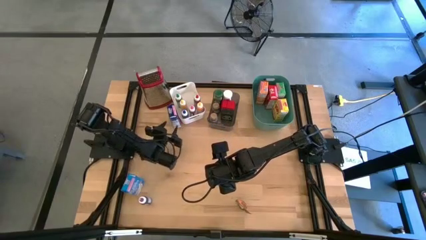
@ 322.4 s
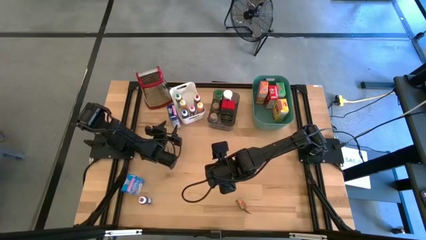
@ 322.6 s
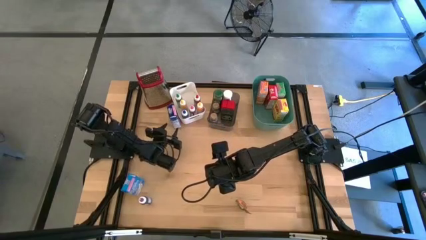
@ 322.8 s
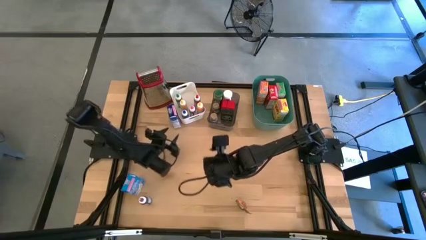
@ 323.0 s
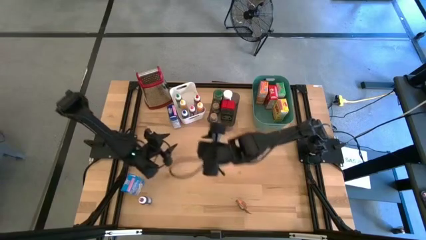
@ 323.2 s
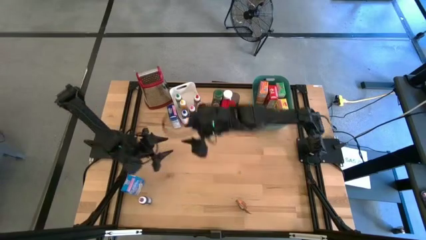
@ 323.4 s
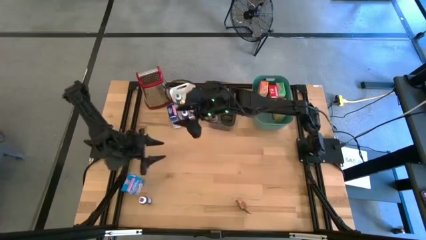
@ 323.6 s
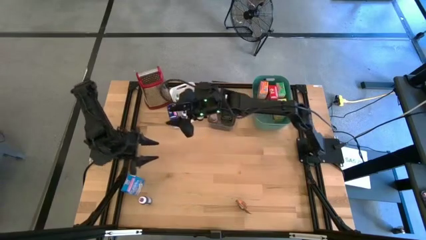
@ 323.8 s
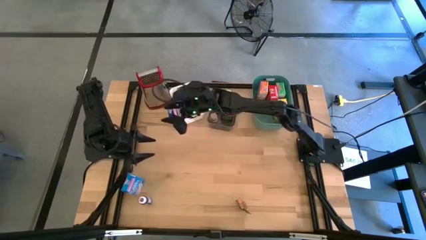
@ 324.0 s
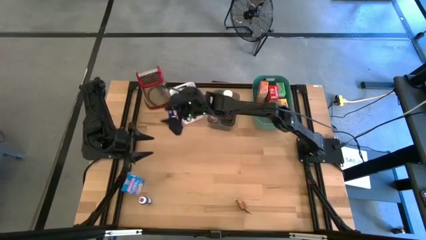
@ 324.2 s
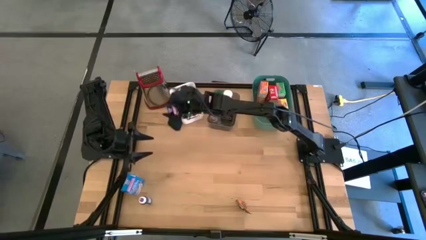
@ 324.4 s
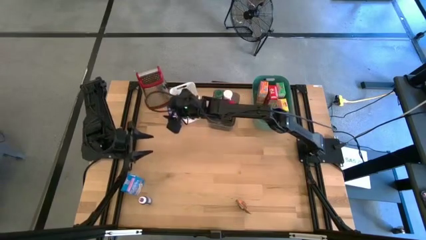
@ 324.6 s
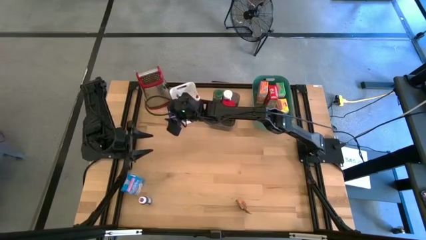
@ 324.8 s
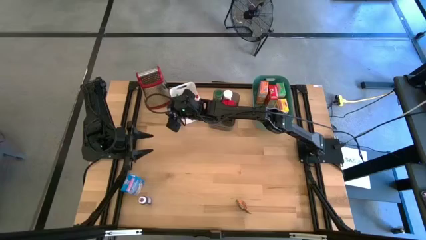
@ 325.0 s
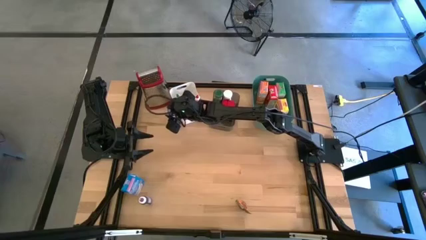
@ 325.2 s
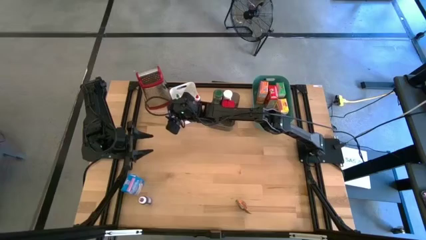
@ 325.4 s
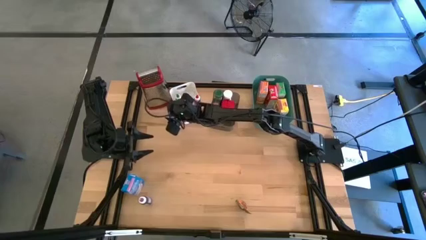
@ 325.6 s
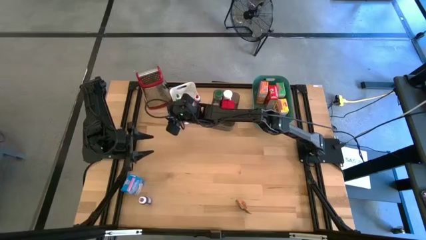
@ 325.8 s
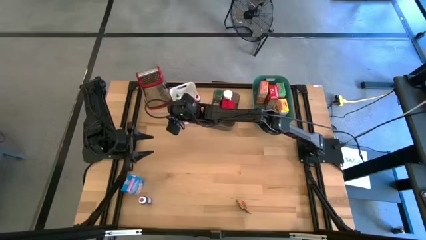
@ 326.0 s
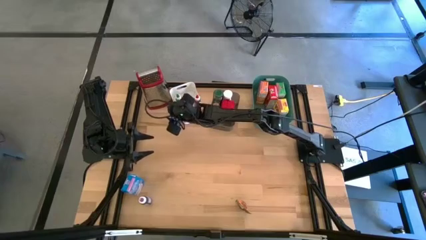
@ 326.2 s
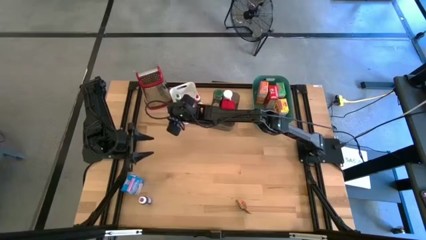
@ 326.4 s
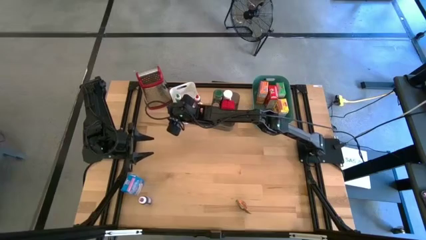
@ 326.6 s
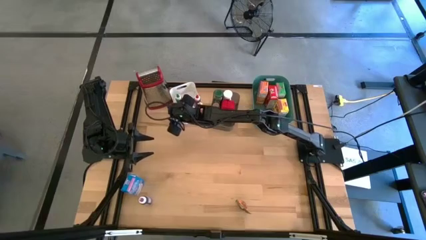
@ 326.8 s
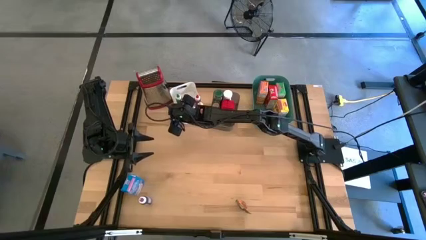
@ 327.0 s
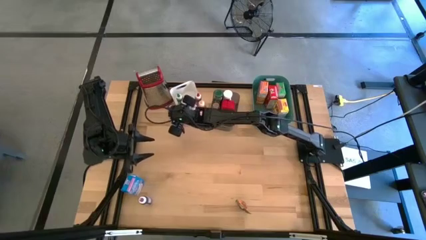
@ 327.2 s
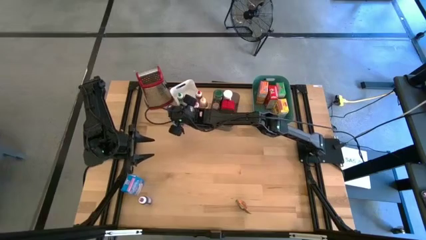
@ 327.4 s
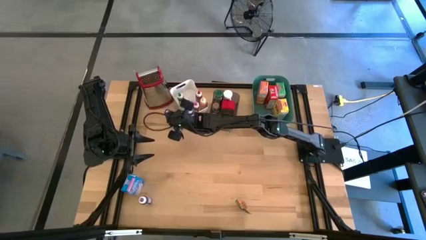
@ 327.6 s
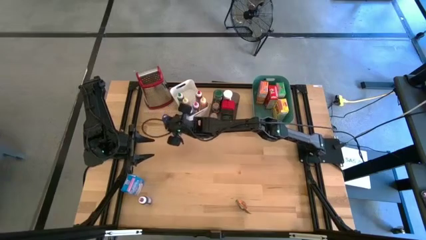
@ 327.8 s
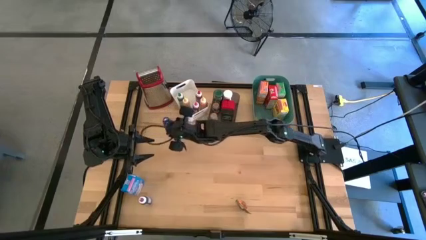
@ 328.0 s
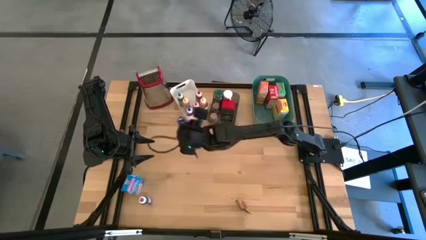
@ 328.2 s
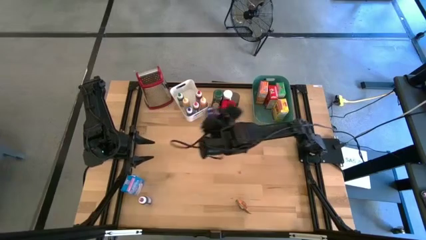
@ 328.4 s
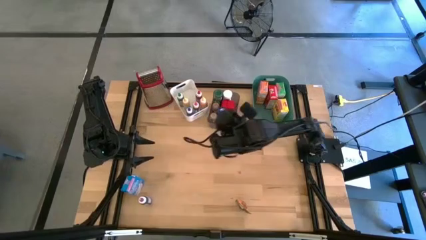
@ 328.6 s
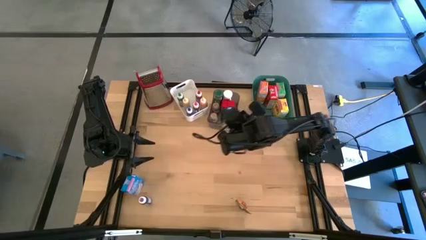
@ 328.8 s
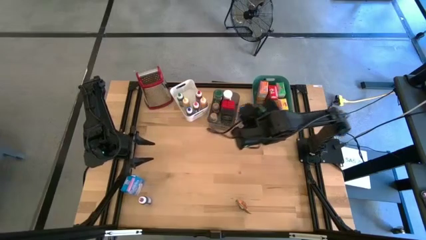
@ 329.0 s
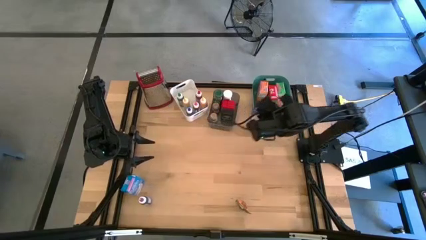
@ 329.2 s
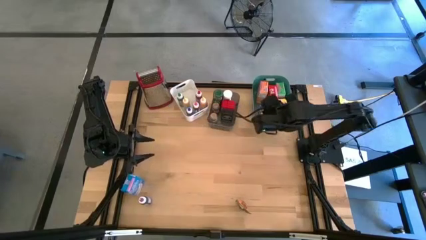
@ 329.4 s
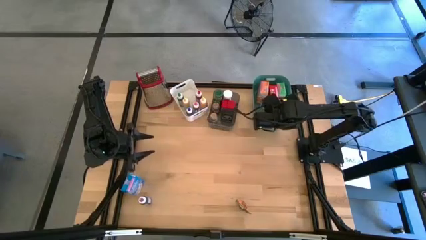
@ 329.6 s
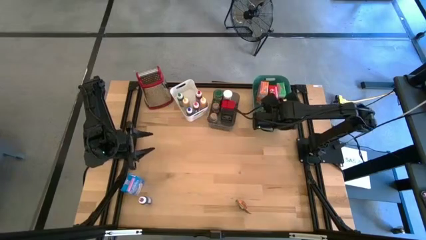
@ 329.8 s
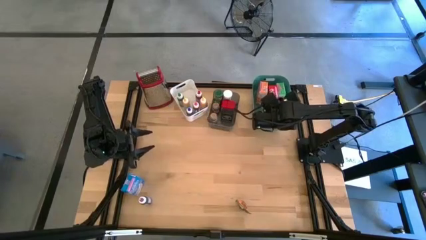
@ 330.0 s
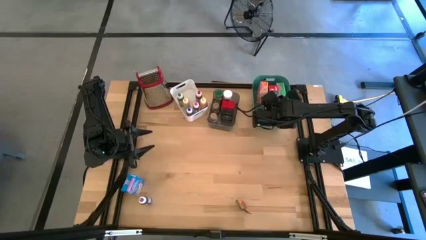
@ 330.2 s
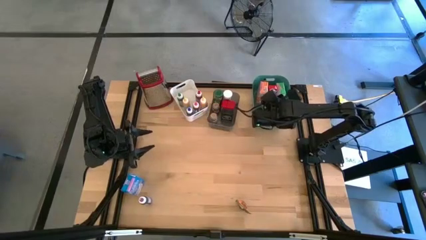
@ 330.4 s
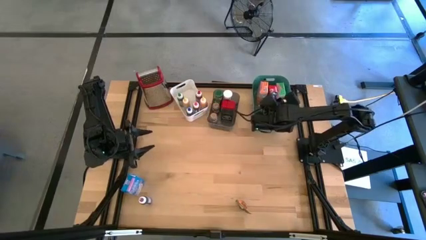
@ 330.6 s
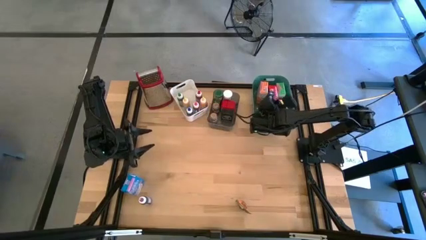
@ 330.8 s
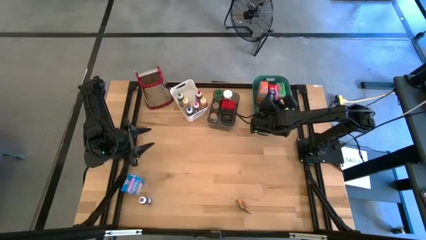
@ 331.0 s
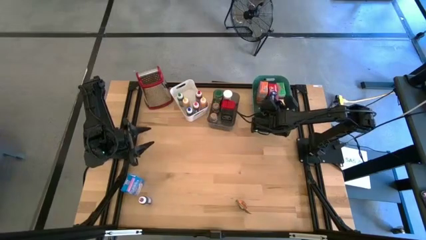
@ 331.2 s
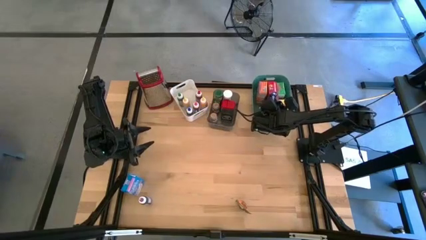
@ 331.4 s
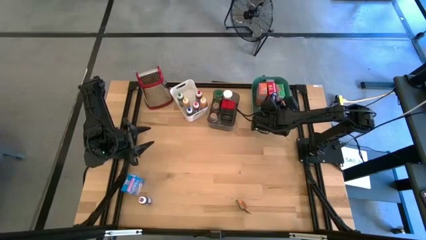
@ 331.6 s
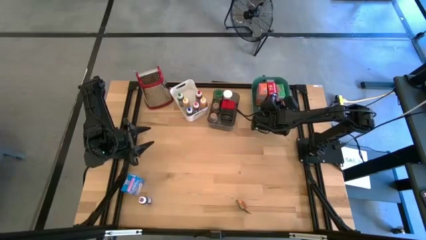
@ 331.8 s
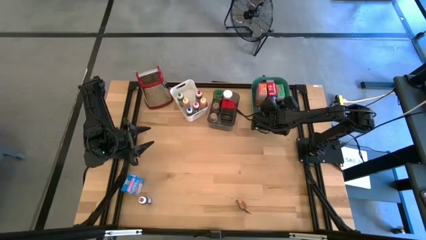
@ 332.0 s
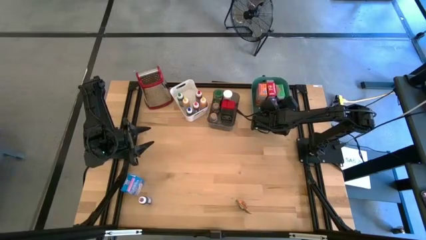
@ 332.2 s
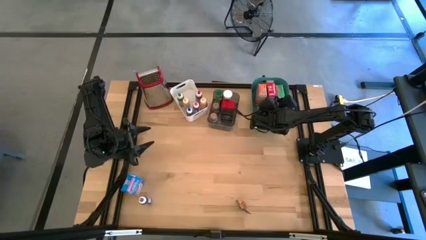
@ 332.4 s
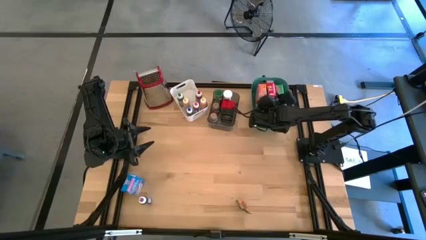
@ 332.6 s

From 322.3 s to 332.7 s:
Task: Pick & Place Kitchen Items
Put the blue cereal box into the green bin

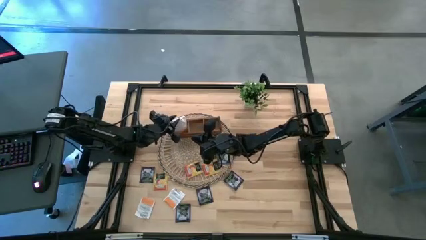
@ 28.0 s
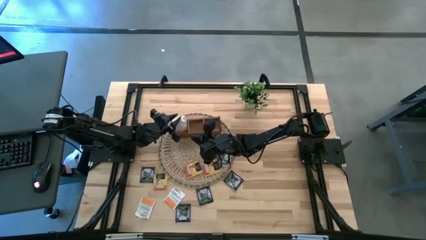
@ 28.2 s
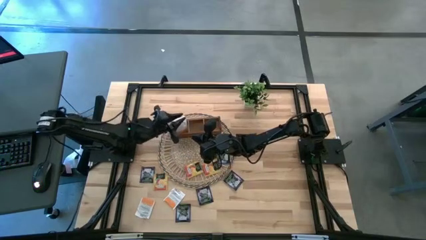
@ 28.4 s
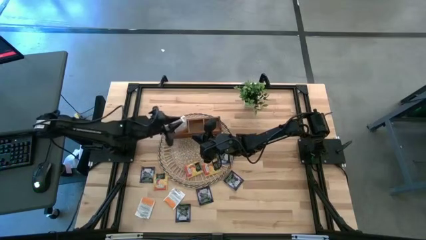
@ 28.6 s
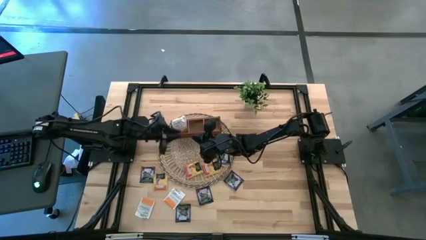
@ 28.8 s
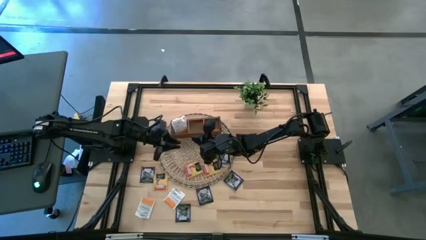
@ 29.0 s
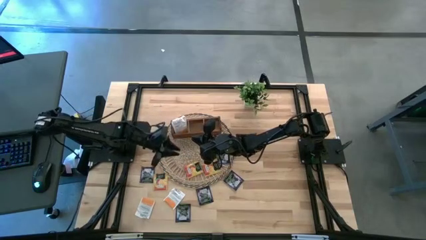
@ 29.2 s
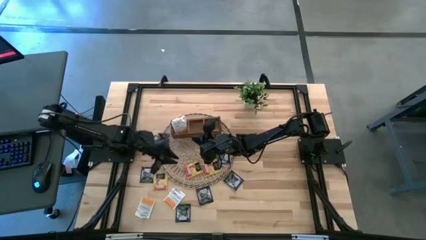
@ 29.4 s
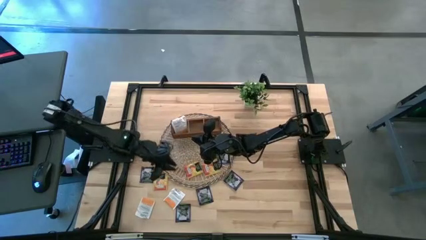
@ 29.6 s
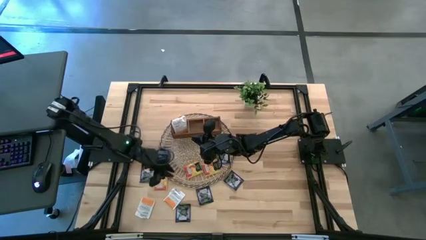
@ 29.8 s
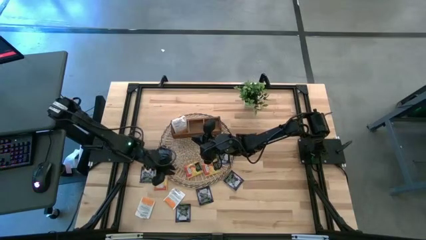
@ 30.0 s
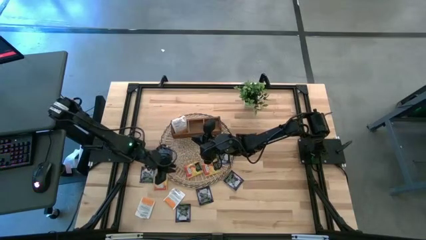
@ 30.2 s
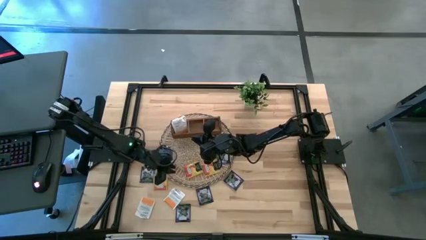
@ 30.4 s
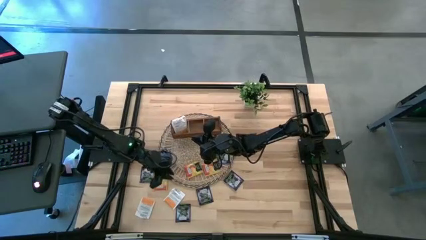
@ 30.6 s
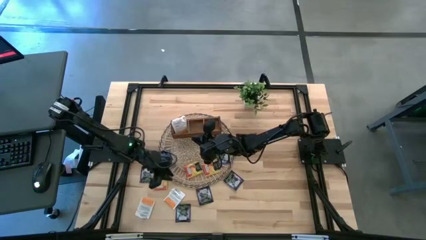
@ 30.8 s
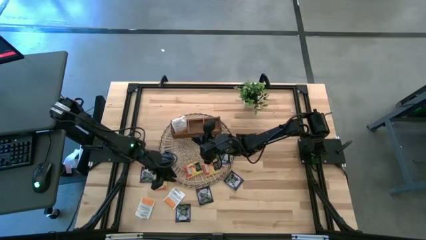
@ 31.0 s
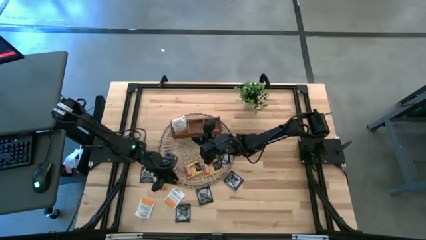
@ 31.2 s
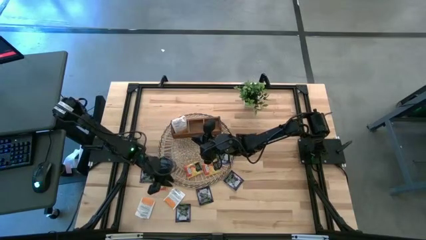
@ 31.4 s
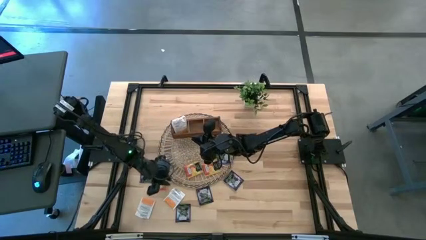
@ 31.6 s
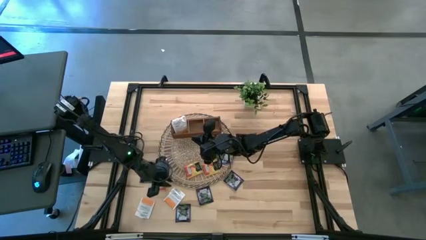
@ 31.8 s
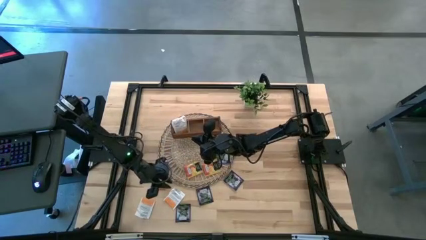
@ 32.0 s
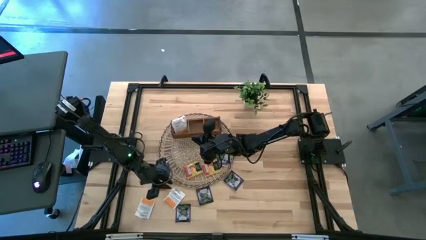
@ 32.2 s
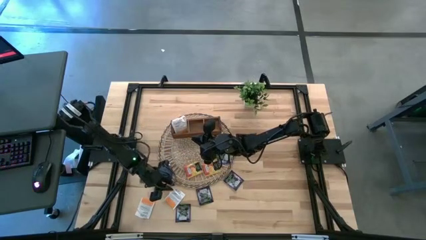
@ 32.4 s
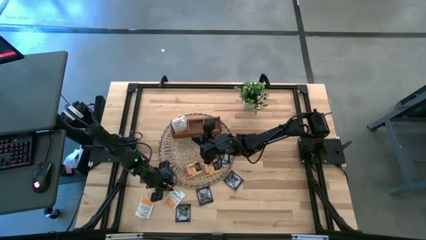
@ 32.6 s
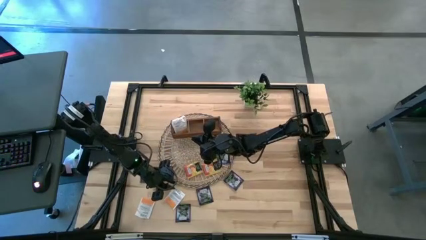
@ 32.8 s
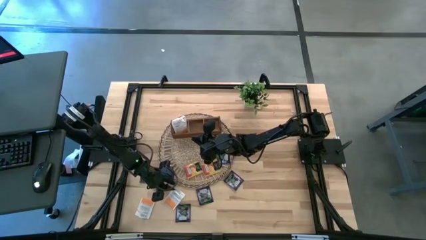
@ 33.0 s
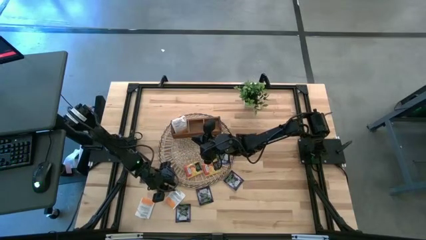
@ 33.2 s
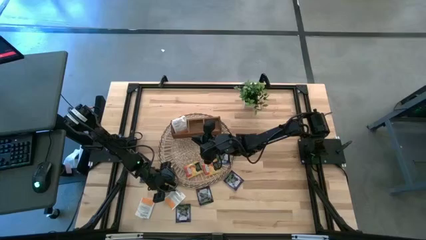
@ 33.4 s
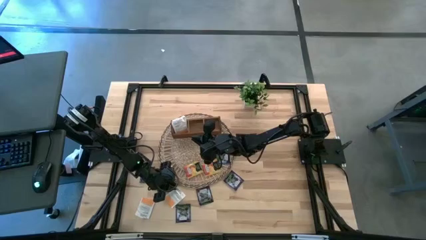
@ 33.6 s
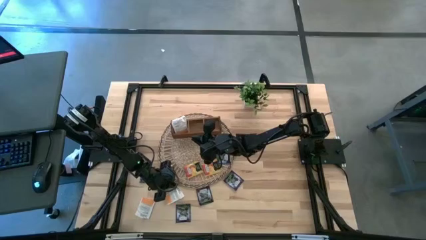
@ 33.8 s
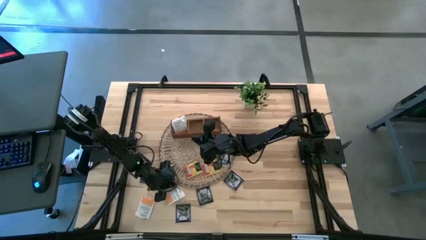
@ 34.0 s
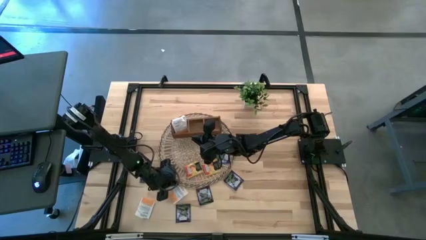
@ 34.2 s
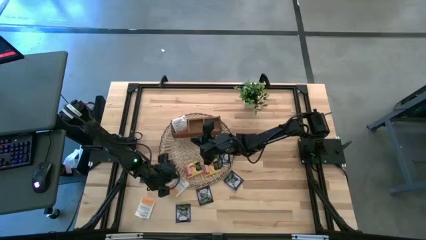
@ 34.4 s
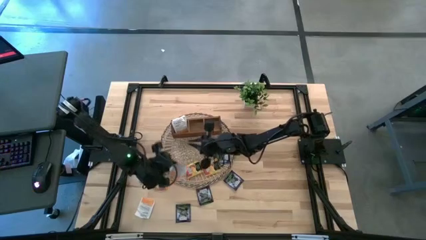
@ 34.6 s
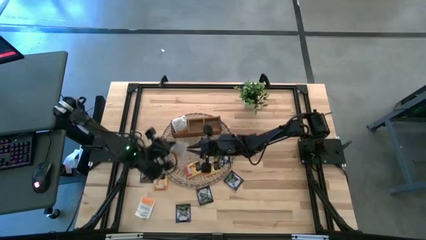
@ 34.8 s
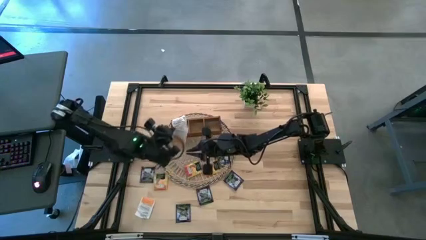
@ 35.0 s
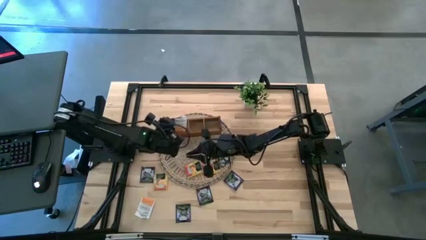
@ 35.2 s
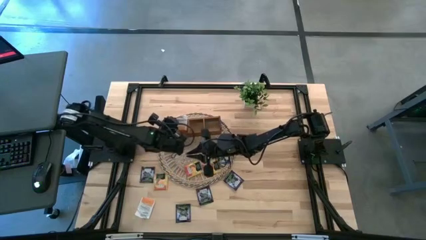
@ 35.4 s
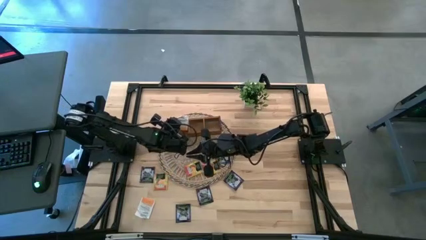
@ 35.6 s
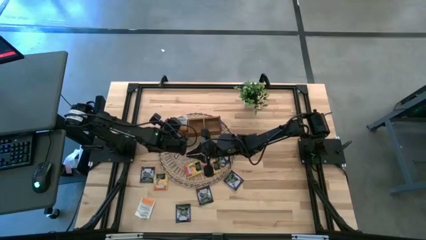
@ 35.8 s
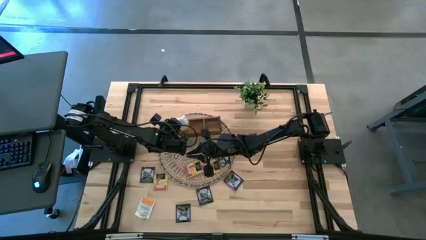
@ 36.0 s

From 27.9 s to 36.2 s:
Task: Pick & Place Tea
Put the white tea packet into the left compartment of the wooden organizer
